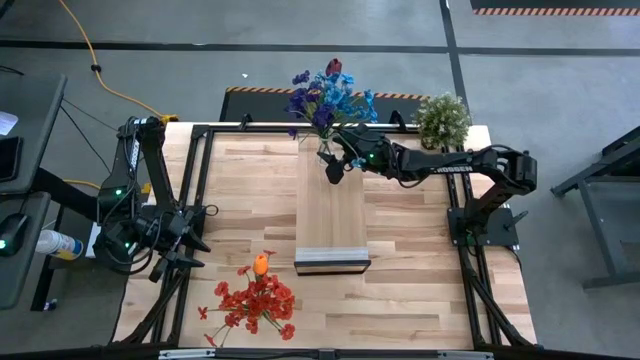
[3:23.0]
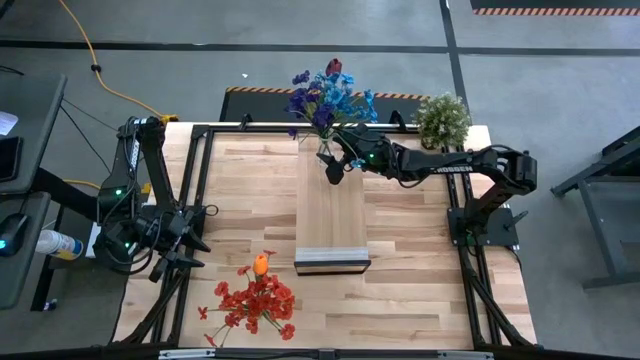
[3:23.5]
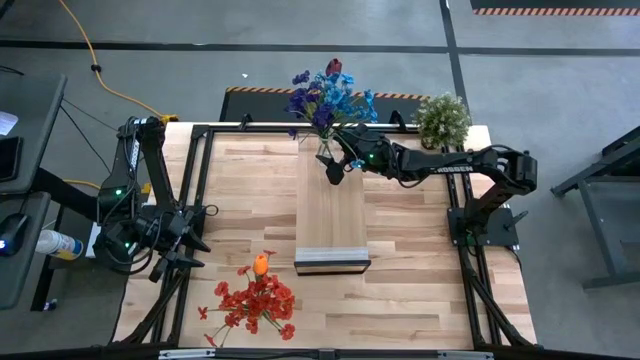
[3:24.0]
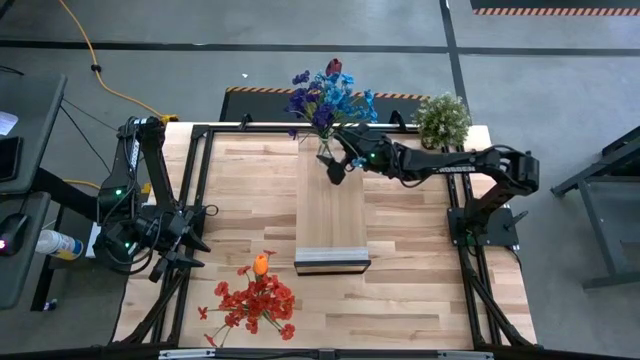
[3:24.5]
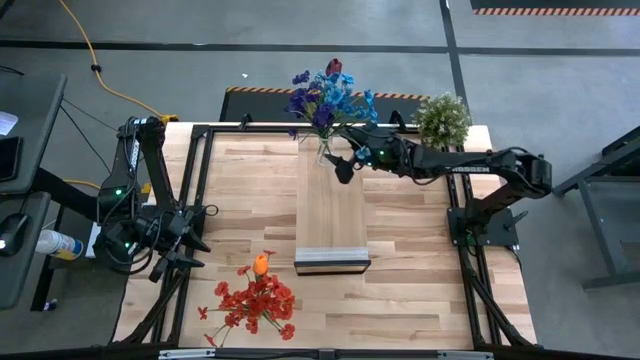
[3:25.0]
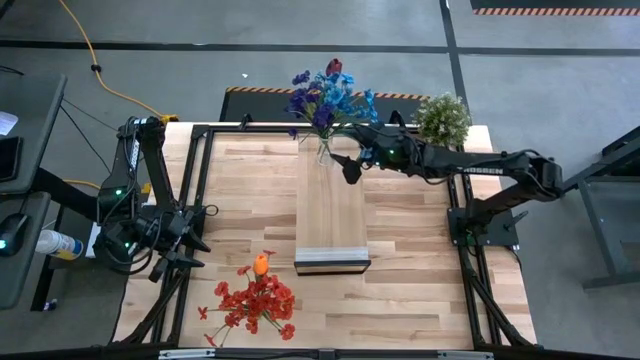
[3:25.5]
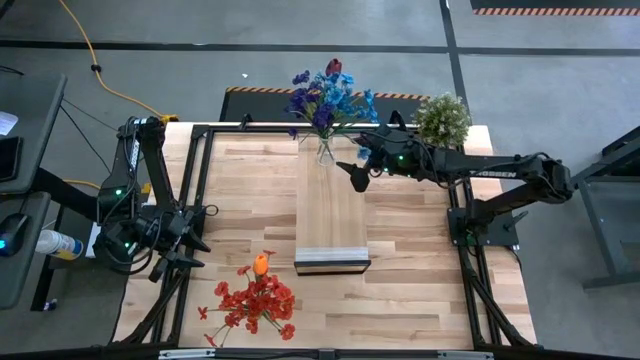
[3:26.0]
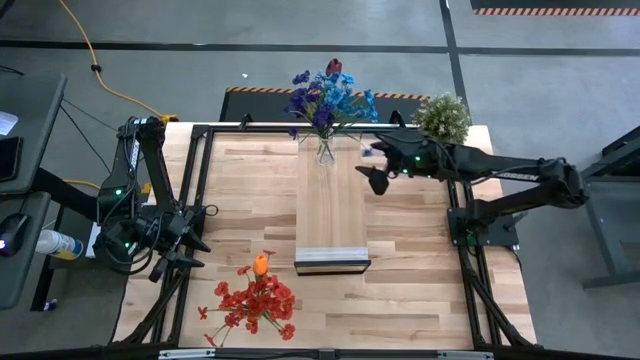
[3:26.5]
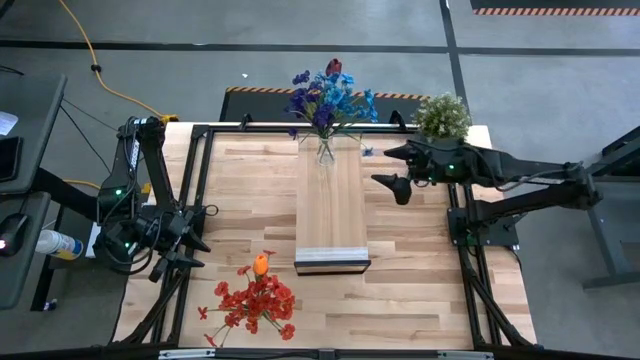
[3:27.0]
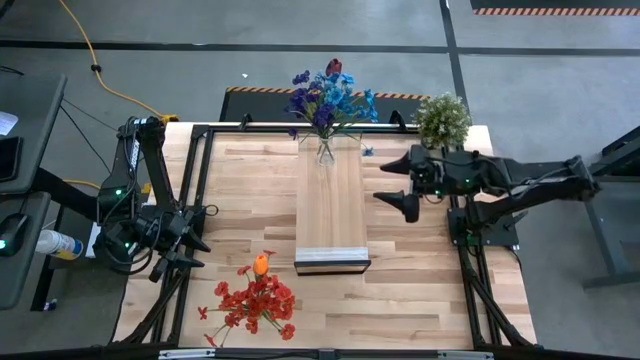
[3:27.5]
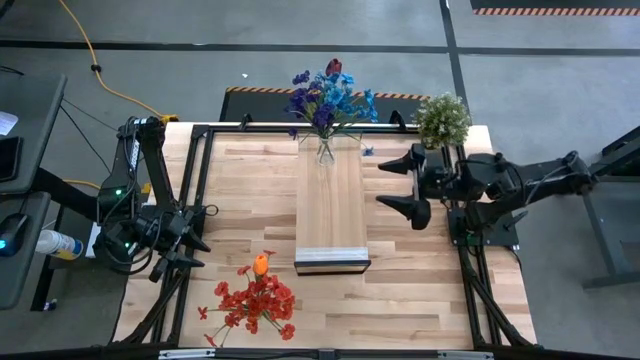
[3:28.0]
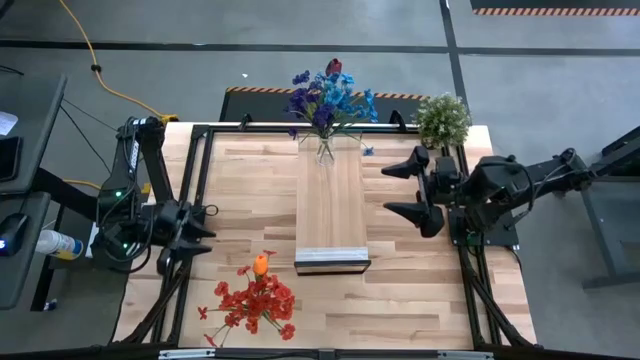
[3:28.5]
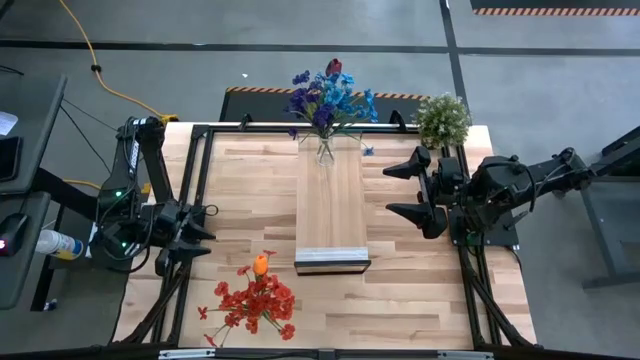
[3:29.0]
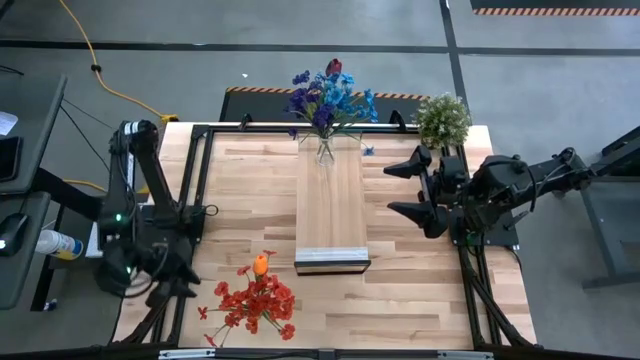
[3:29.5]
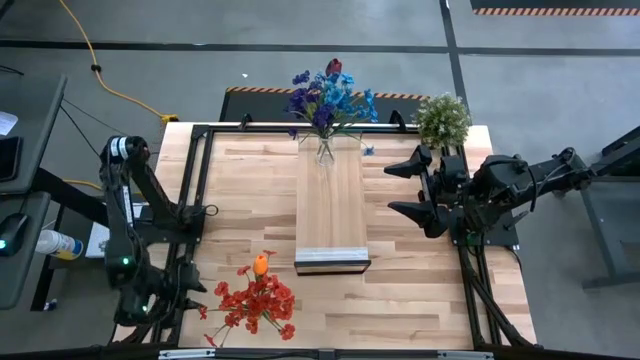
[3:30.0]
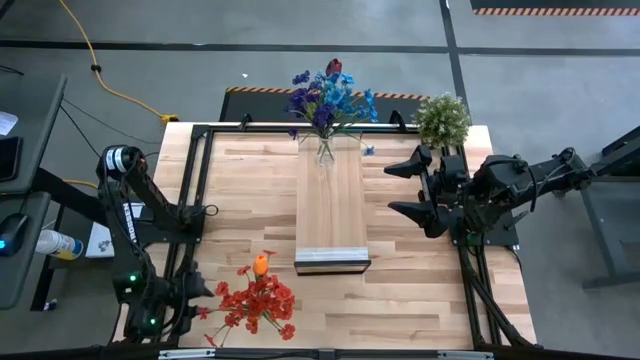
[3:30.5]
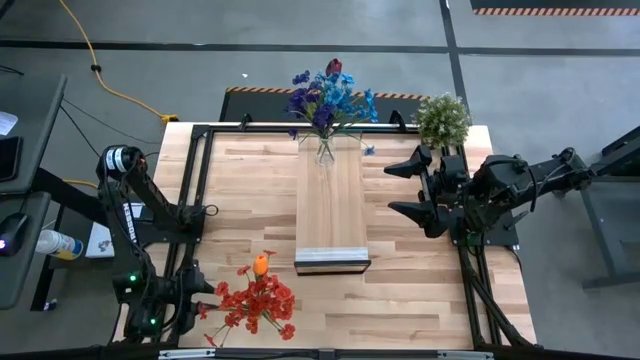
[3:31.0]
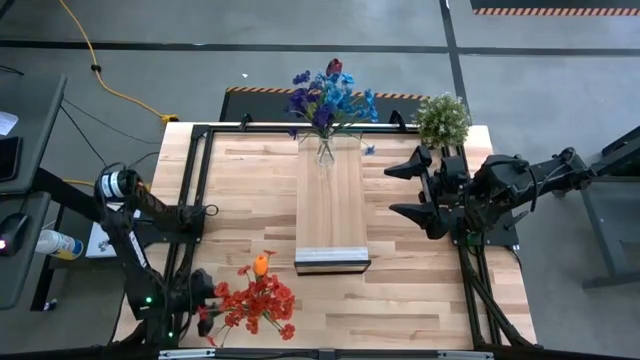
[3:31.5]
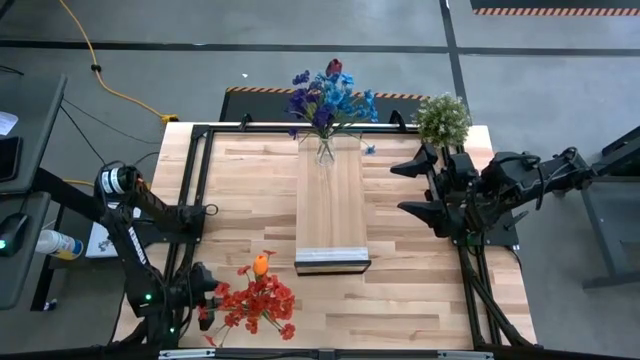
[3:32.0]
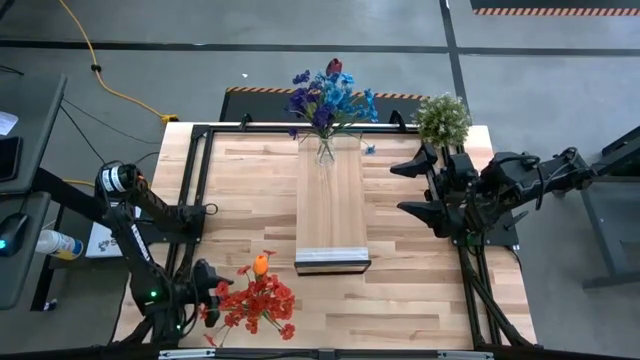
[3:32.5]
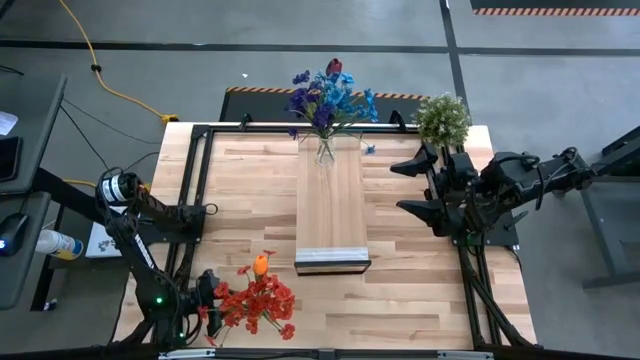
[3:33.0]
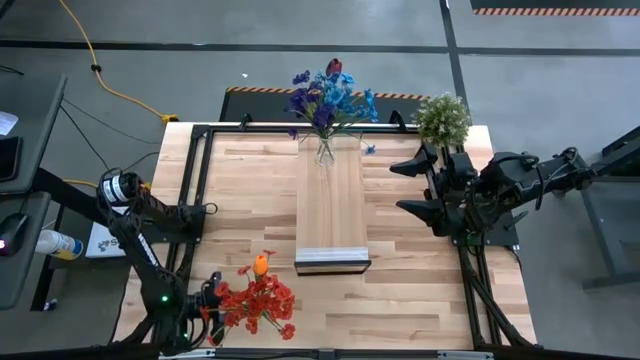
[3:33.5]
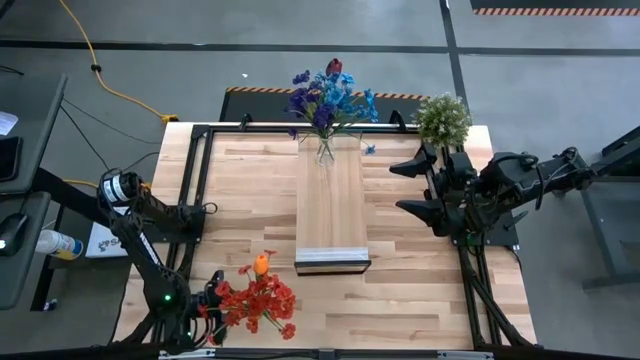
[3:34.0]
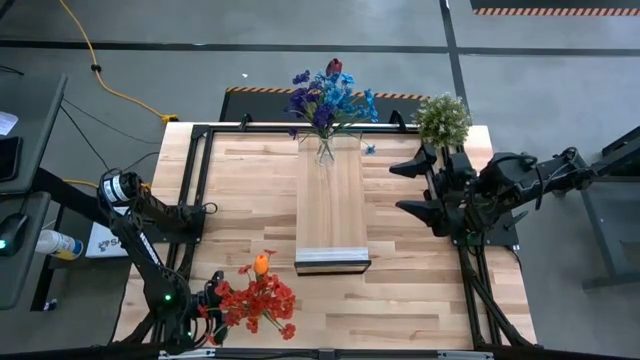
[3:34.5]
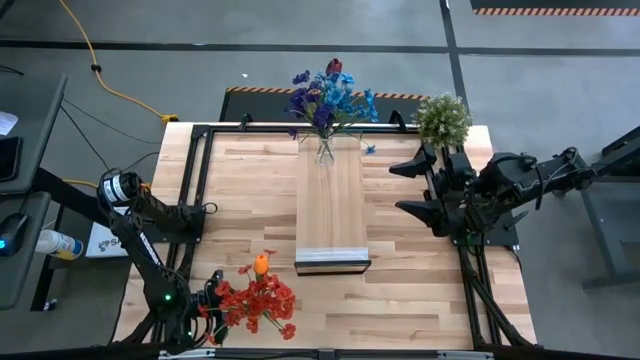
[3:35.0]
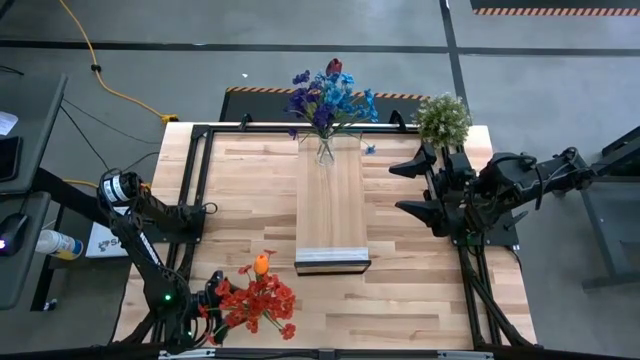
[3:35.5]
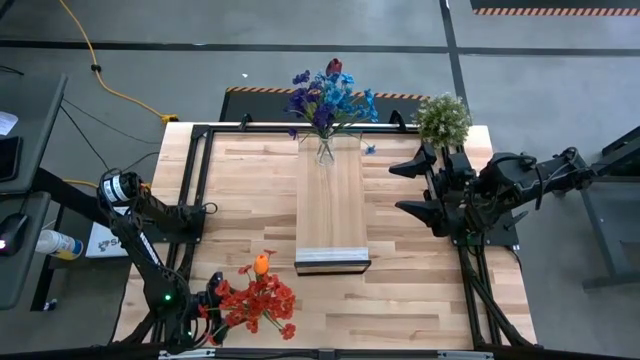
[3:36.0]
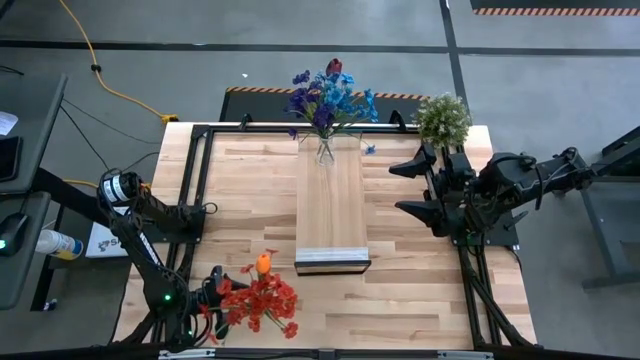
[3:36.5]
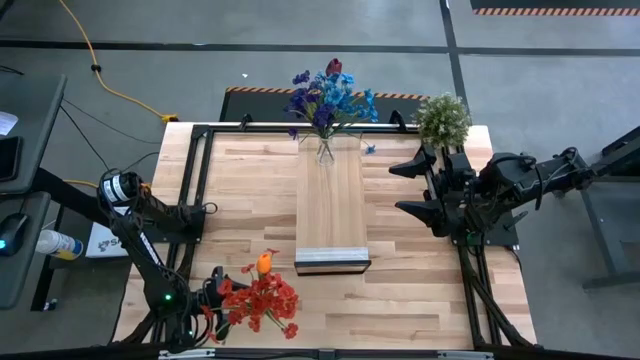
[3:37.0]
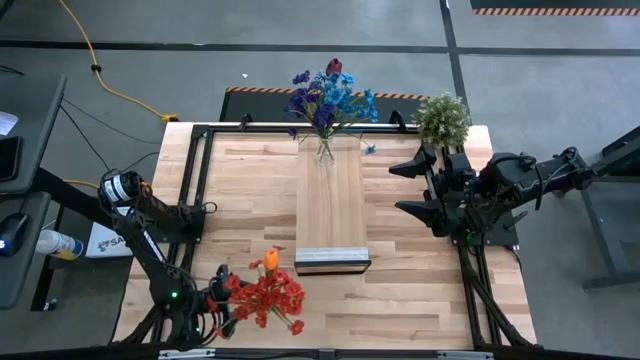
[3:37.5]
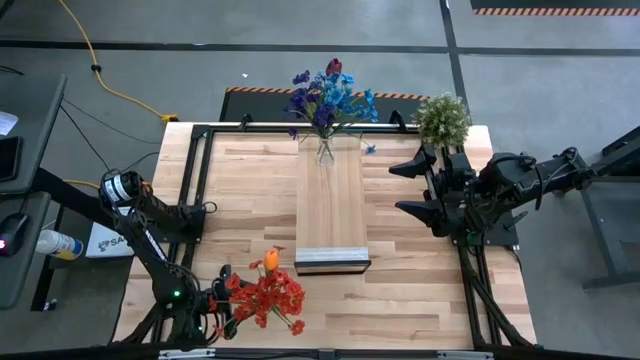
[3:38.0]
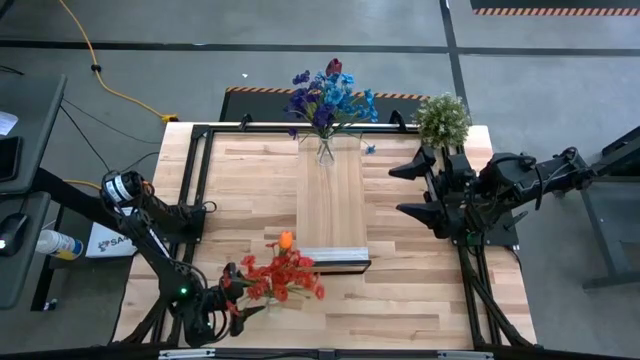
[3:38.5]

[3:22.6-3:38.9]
Task: Pick and place flowers into a vace then onto a shelf
Put the transparent vase with the flowers on the shelf

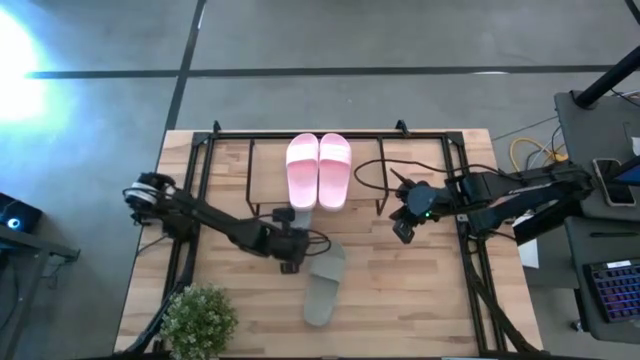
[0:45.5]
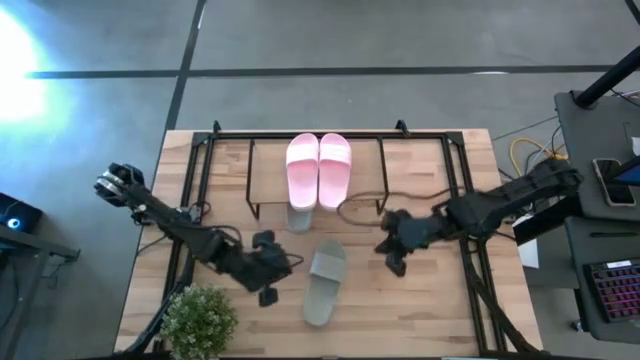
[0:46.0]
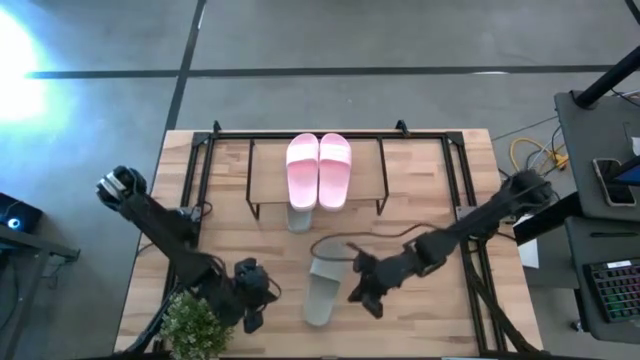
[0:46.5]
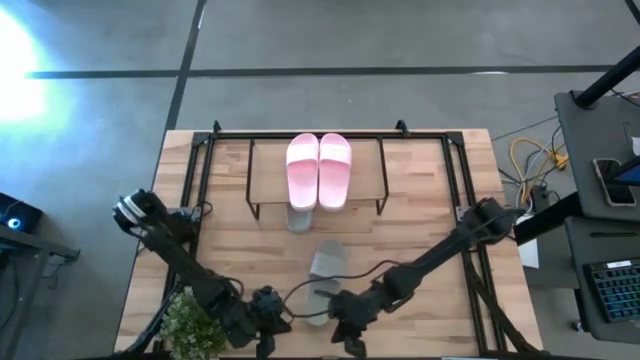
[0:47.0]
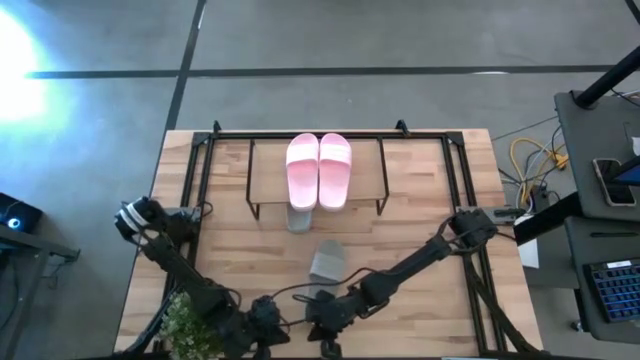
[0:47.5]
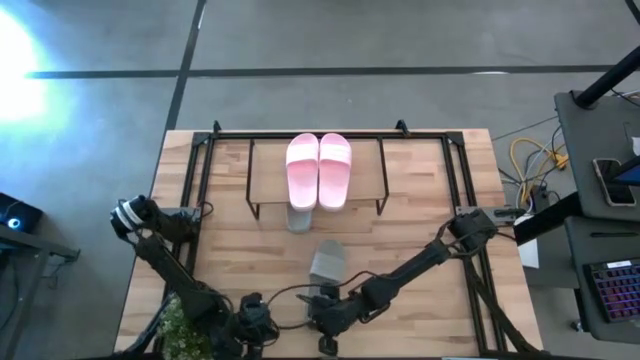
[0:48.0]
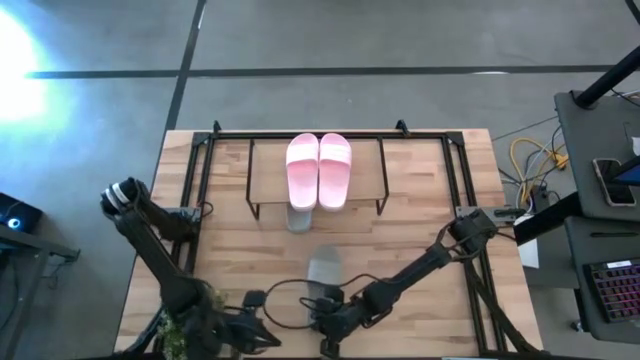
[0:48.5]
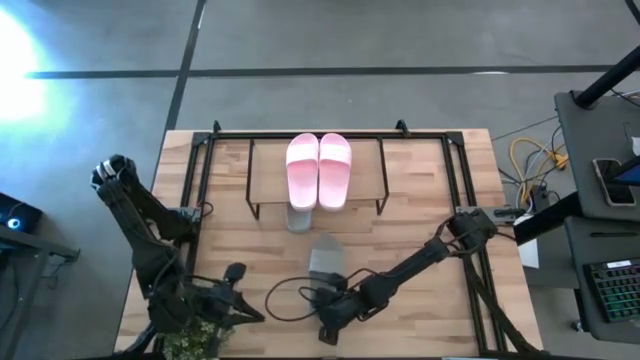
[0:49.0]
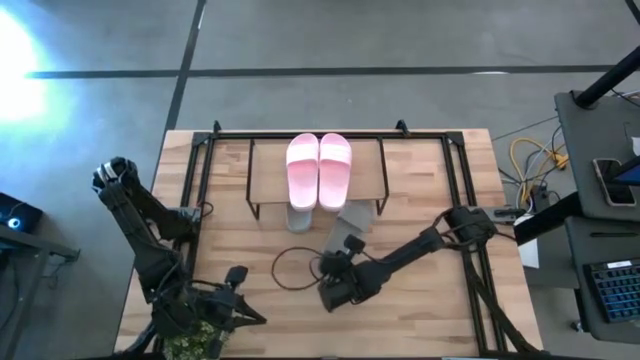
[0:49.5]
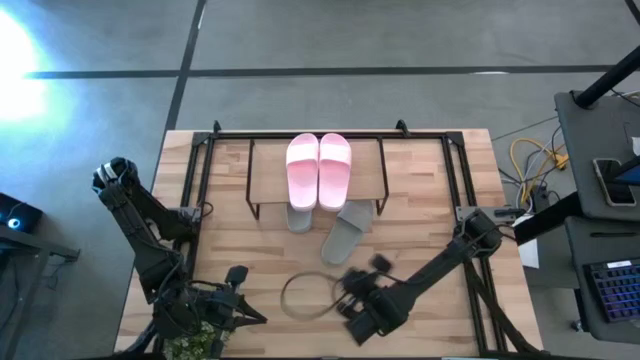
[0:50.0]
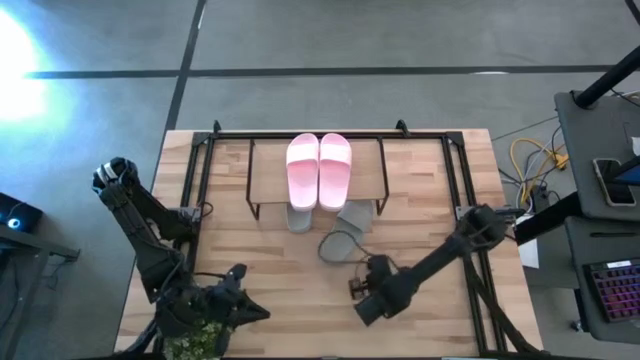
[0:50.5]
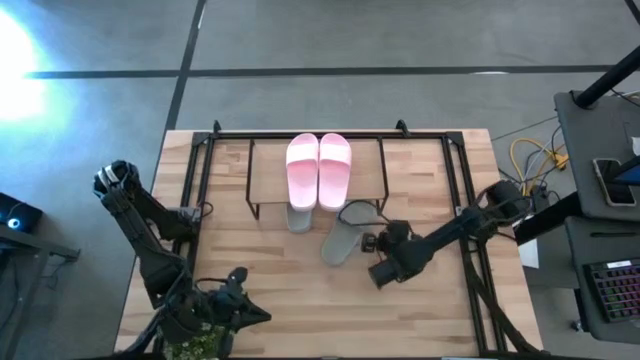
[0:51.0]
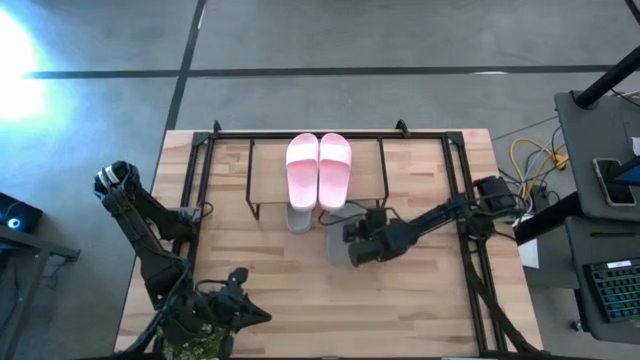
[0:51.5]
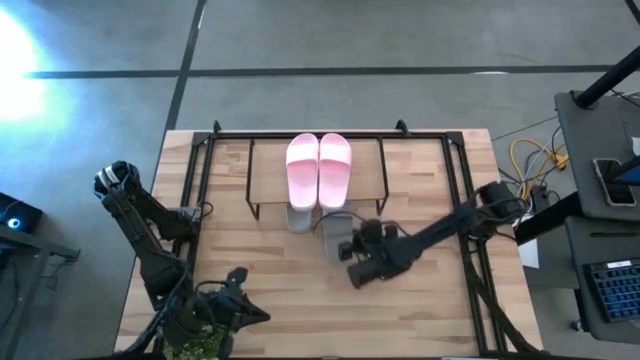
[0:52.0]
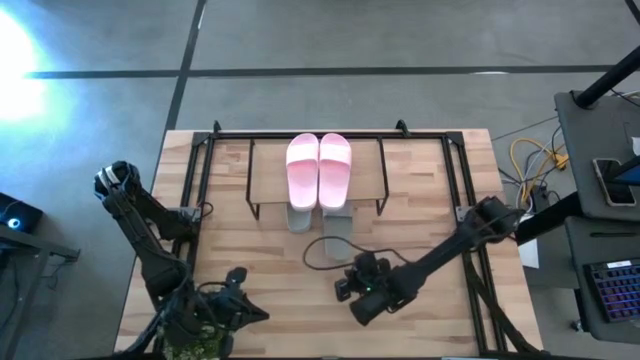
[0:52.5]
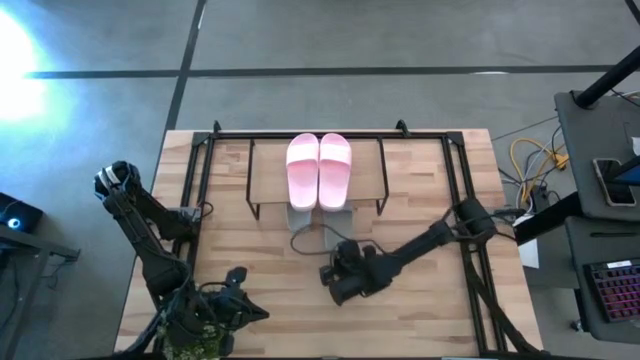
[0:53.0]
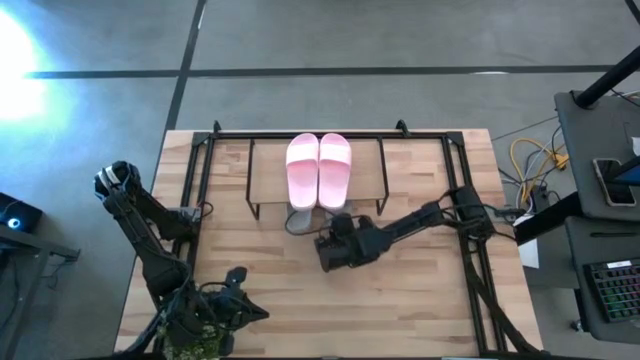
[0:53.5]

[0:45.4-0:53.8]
Task: Pick and place slides into the shelf
Move the gray slide under the shelf
